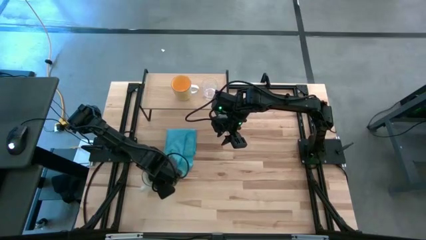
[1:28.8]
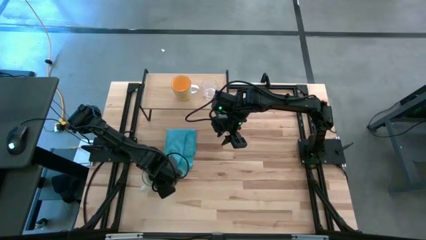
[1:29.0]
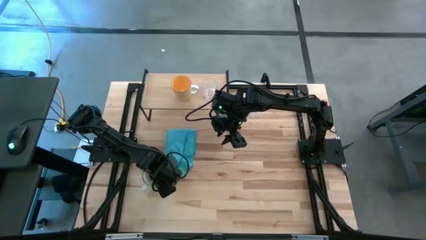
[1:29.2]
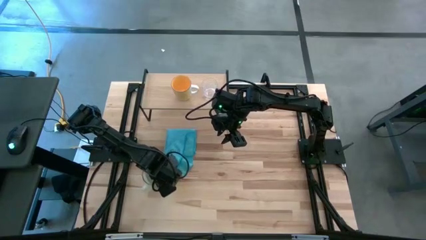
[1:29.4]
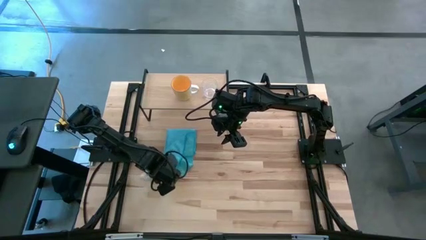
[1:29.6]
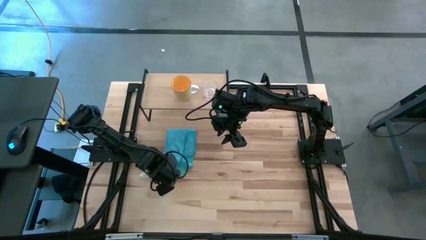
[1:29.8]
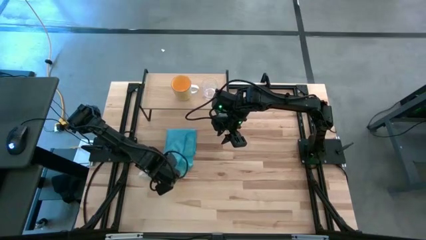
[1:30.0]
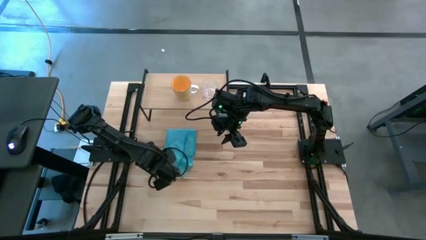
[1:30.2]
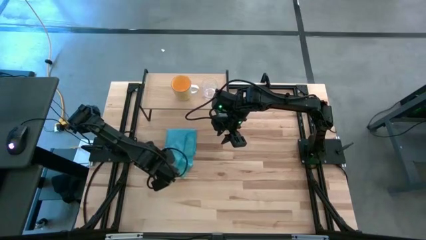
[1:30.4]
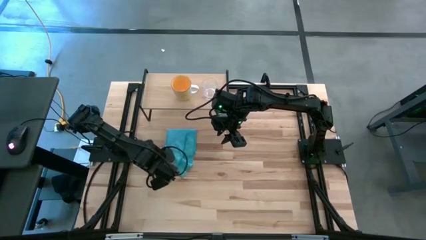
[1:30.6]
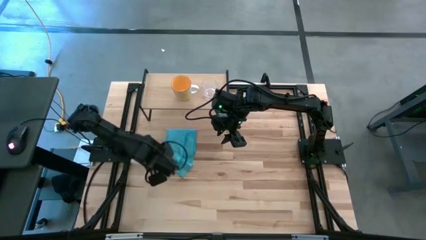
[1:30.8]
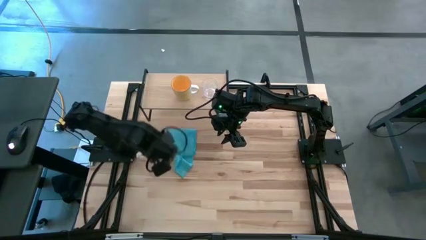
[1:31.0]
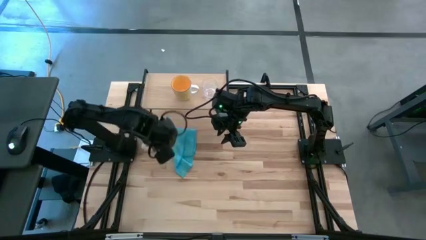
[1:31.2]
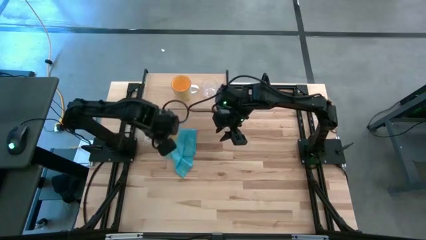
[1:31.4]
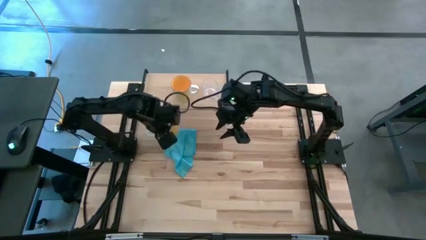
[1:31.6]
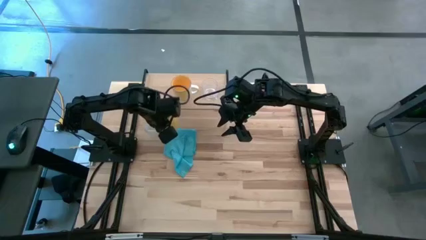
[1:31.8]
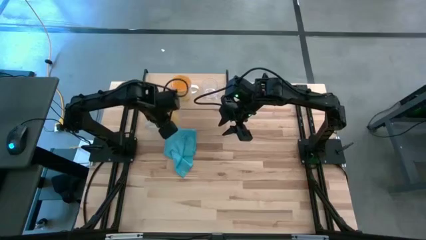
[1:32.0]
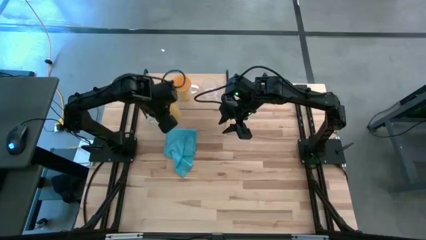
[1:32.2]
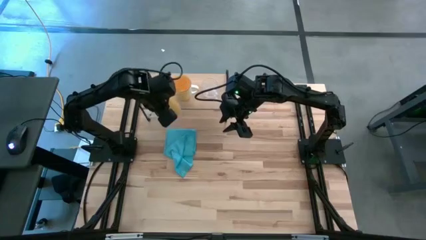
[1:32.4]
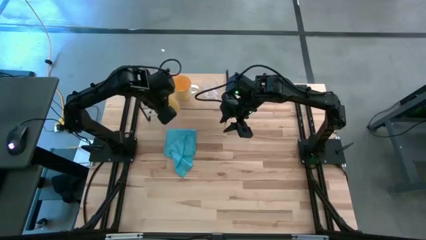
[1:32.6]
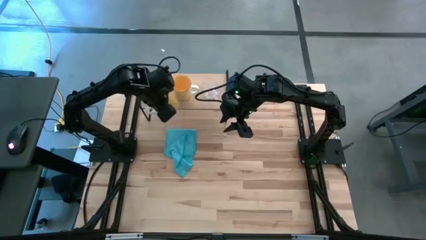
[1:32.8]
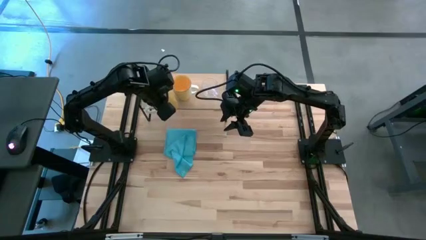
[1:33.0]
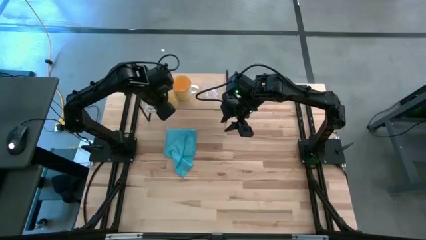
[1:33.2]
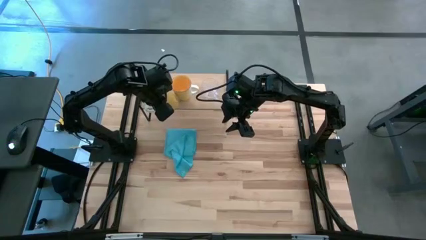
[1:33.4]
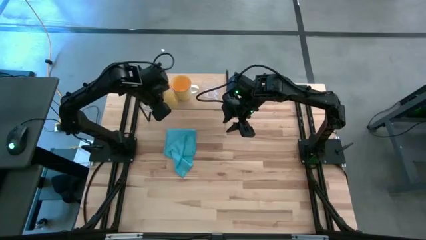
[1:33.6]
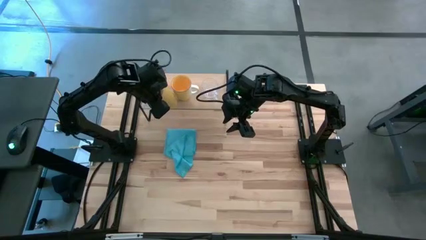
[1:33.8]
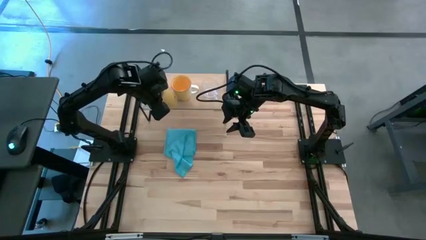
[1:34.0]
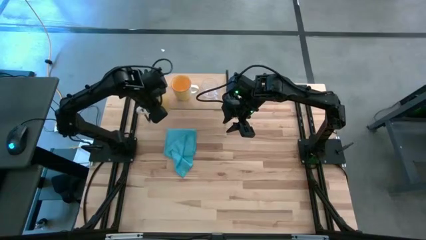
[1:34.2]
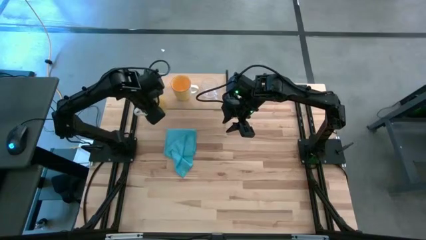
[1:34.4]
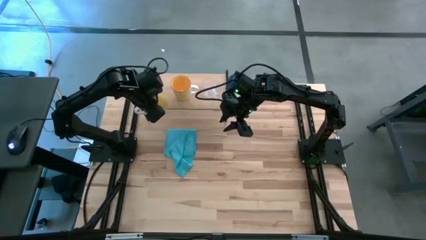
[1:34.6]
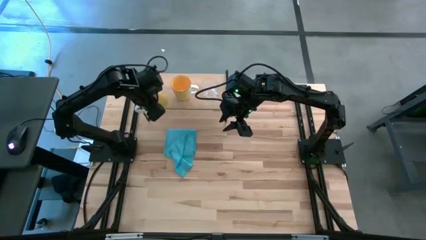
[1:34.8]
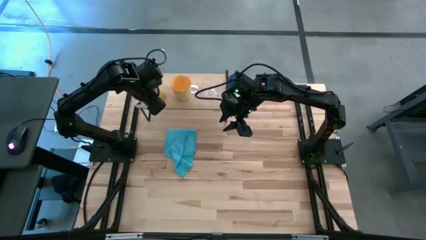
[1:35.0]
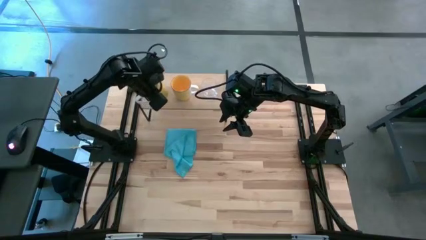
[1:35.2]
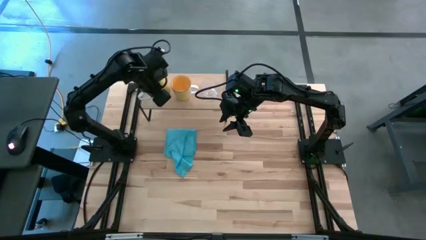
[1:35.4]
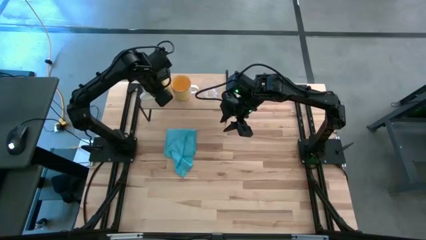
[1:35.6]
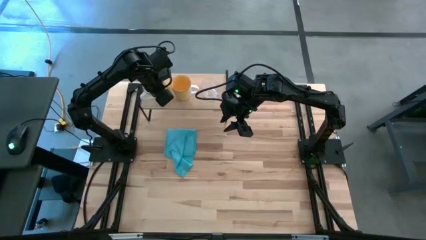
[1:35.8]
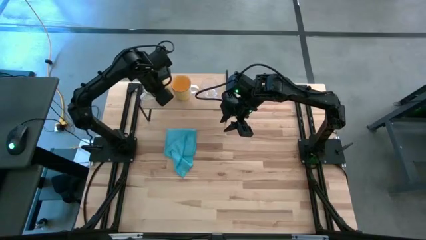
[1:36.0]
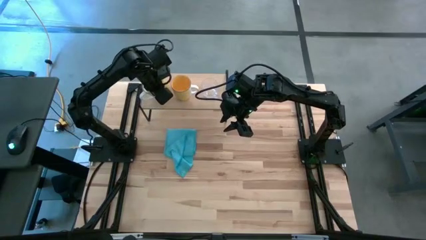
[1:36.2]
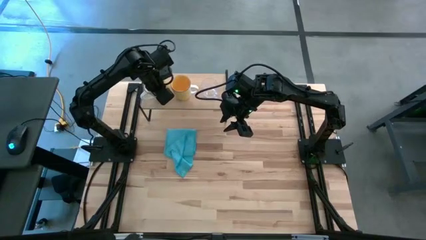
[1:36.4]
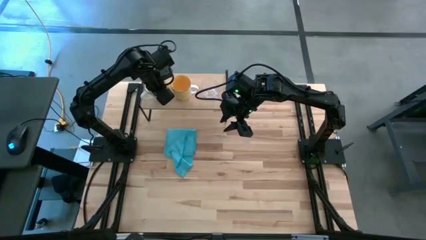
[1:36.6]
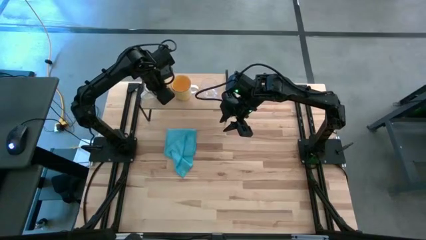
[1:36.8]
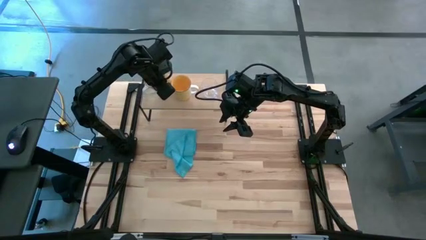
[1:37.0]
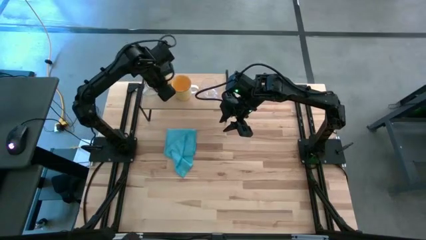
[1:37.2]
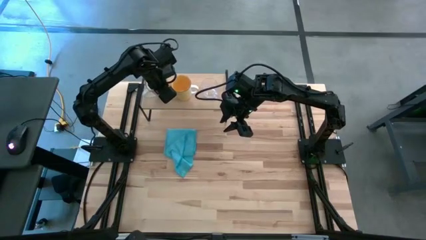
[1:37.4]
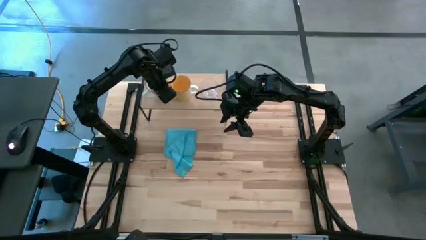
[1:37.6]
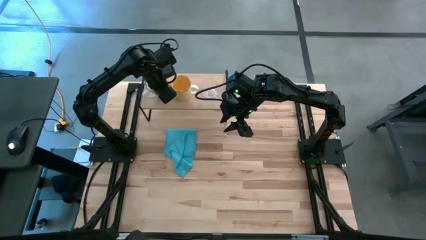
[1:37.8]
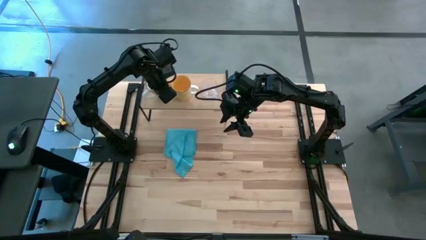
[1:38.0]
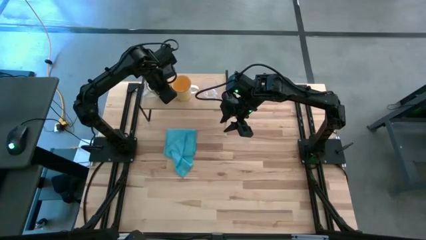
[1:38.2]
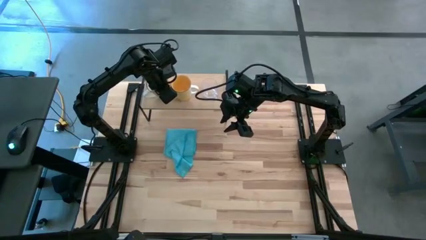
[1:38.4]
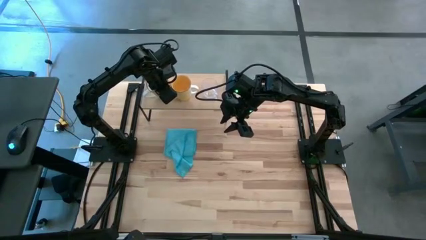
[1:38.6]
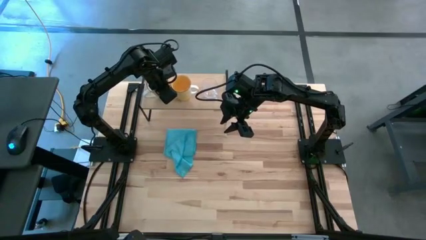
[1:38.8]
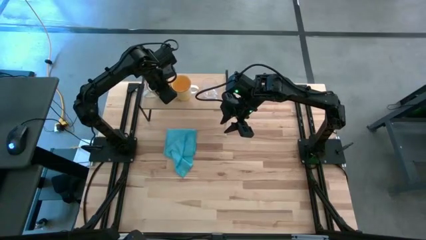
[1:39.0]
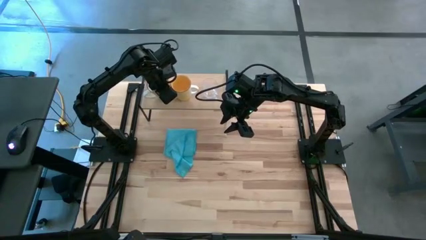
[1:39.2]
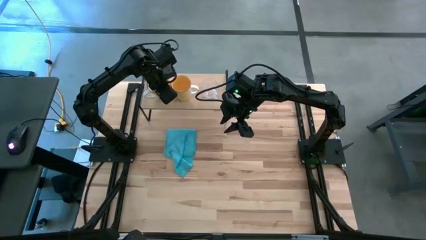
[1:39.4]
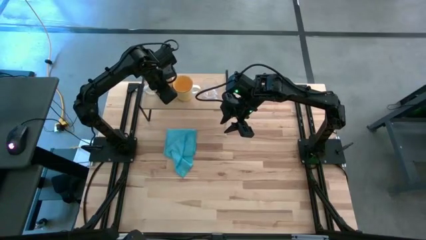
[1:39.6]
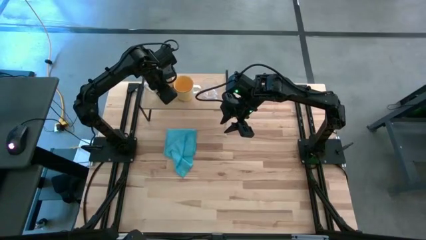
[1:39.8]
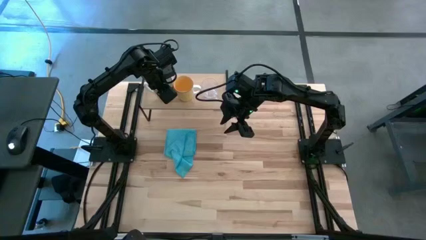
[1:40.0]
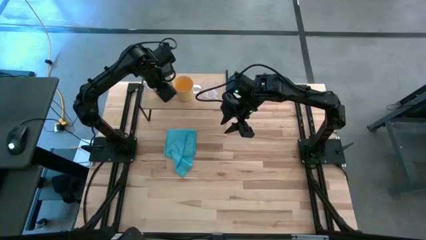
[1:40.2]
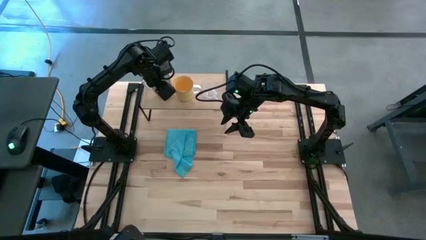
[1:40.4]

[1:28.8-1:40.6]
Task: Stack small to large cups/mugs on shelf
Put the white mug on the shelf

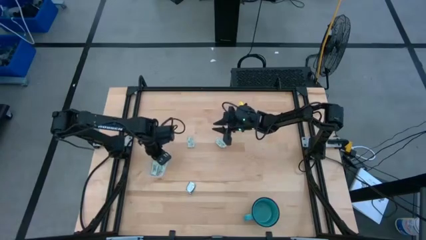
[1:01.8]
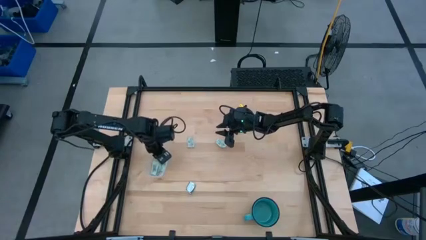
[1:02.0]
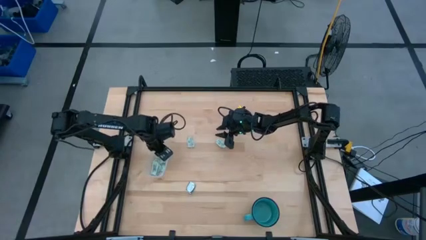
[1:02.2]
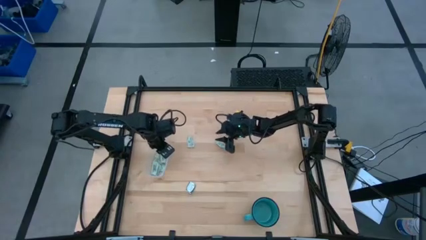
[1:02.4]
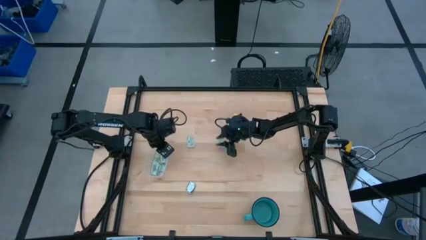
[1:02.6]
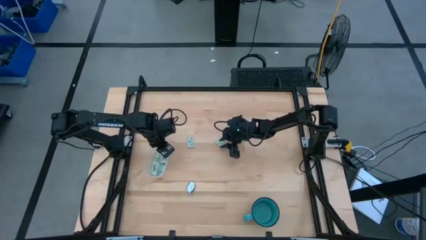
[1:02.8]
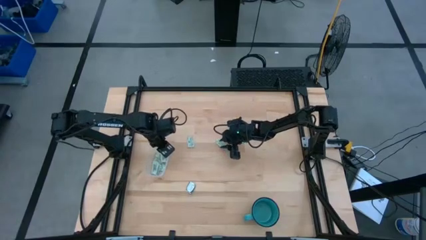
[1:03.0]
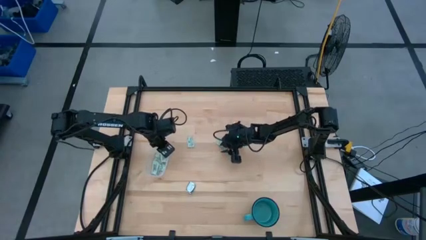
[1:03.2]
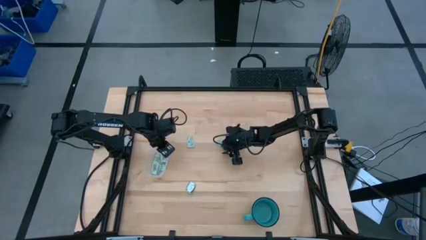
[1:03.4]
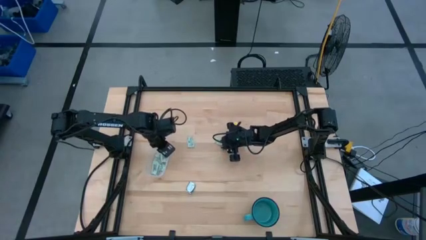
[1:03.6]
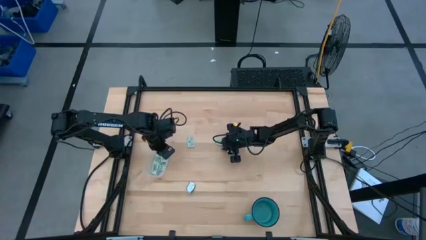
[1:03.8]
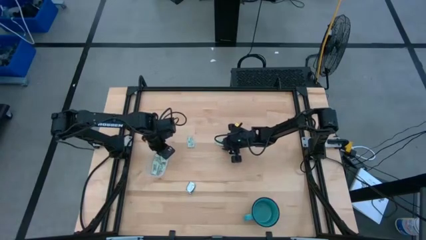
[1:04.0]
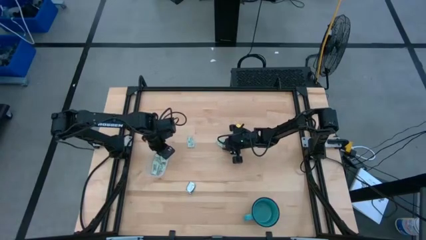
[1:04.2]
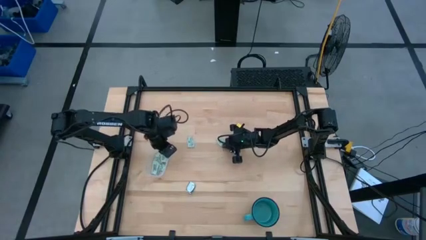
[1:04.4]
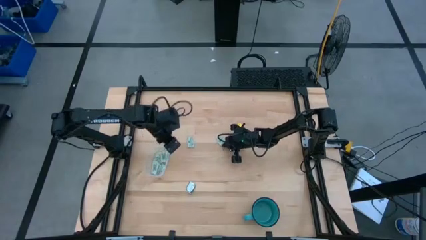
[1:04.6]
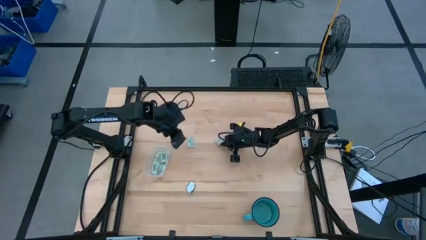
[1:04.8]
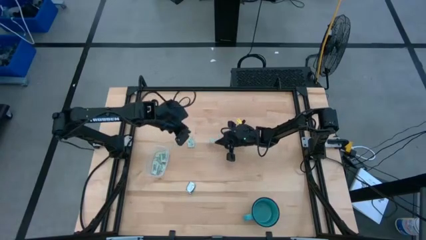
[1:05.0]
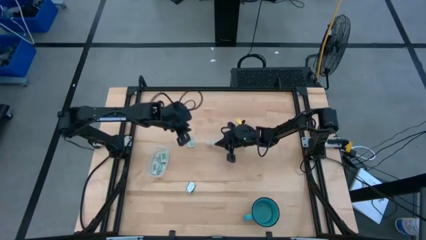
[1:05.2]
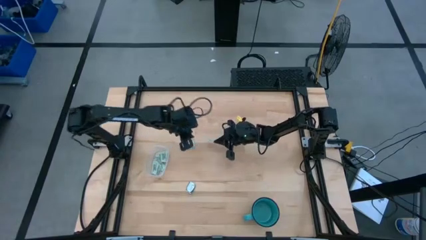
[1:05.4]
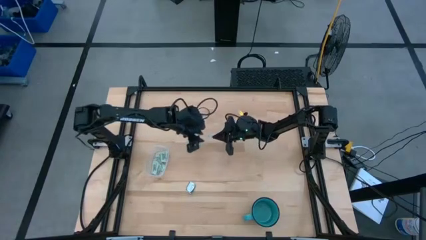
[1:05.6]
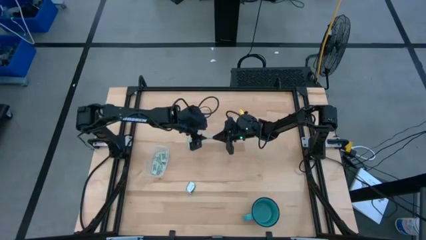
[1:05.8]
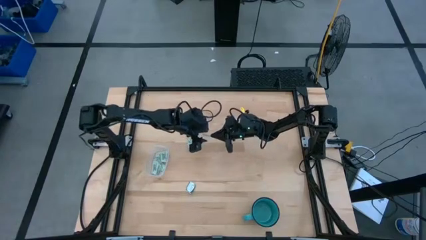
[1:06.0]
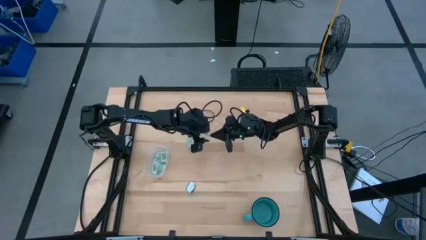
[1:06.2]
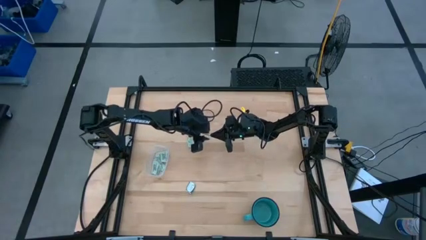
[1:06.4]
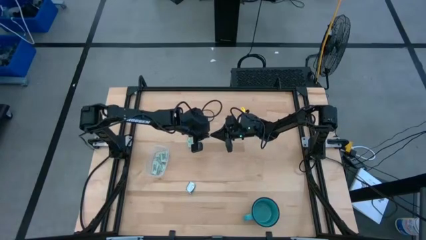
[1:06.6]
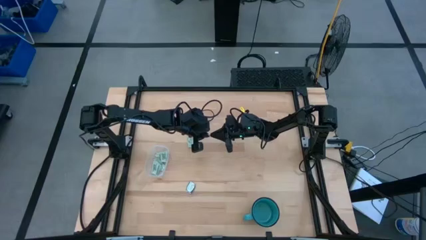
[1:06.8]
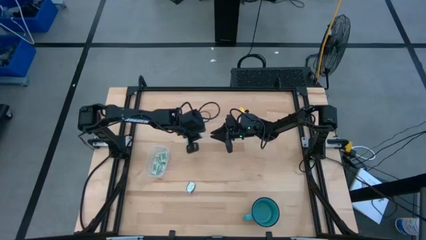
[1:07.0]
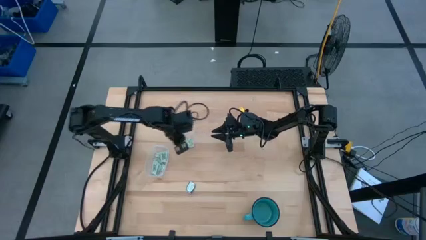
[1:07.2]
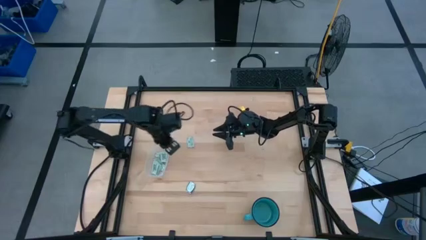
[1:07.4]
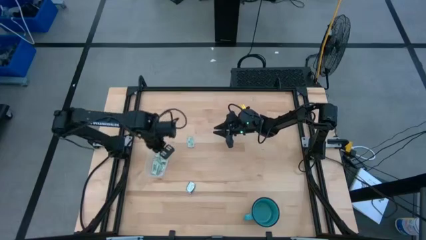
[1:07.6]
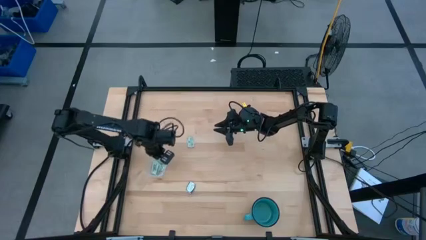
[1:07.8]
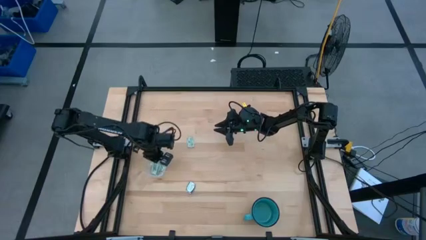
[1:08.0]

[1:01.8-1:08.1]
Task: Pick and place Stevia / Truvia into bins
Put the light green stevia packet into the transparent bin
